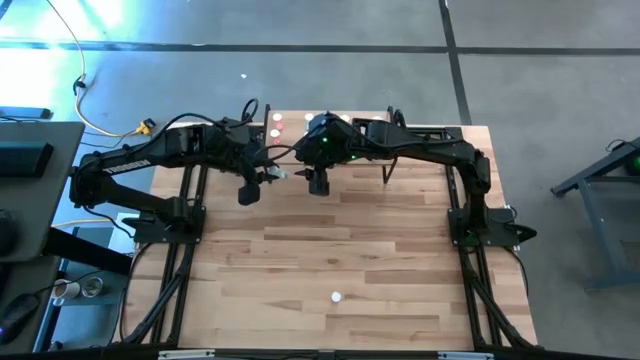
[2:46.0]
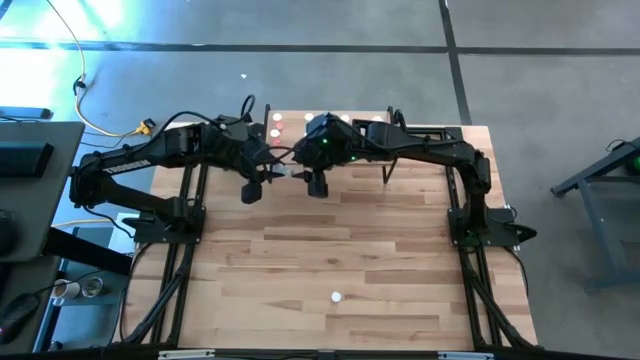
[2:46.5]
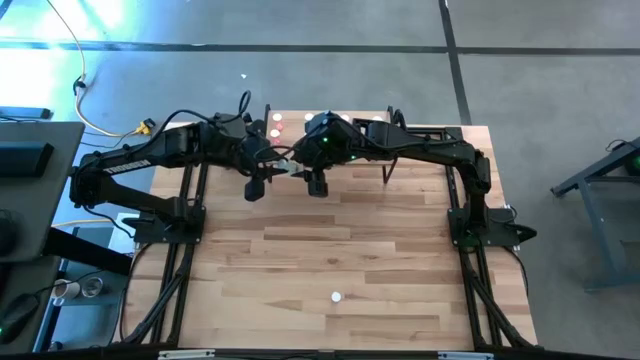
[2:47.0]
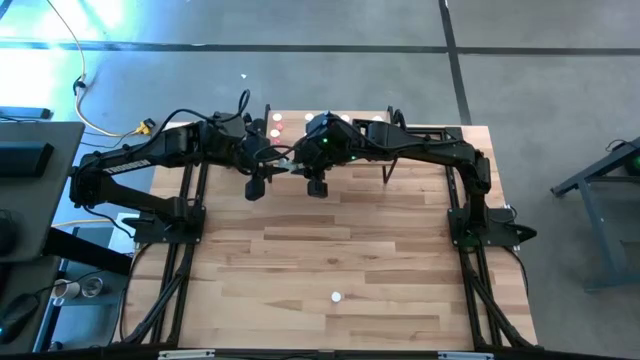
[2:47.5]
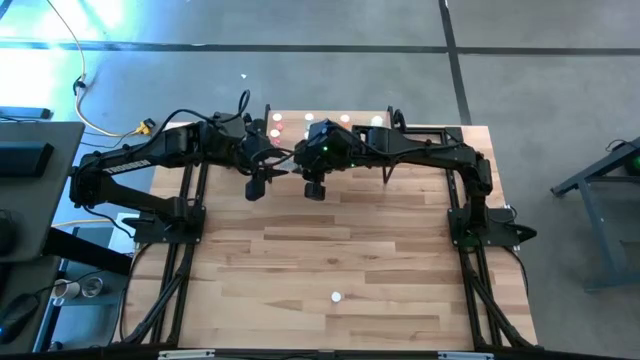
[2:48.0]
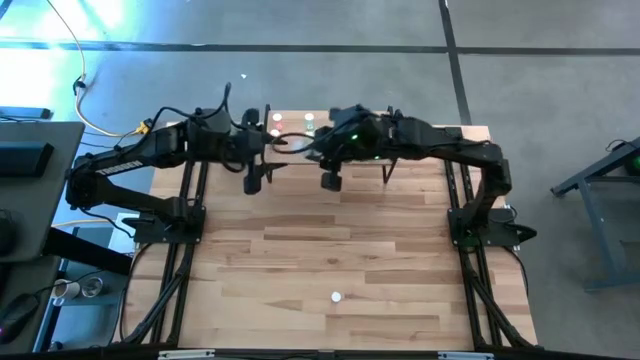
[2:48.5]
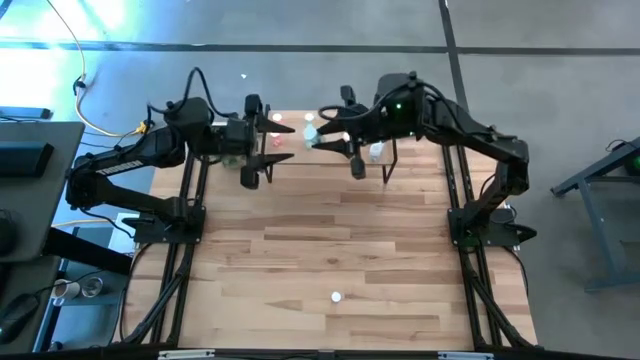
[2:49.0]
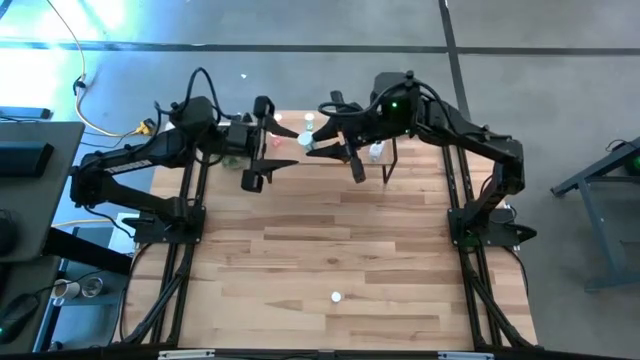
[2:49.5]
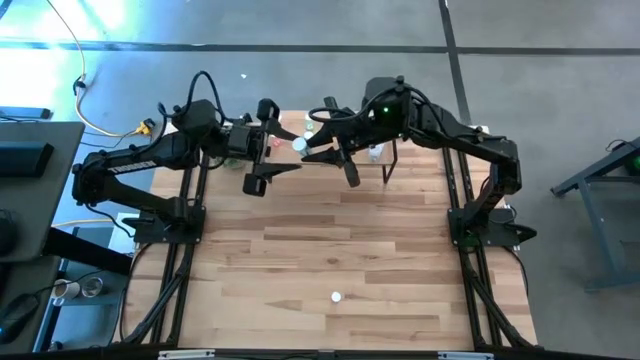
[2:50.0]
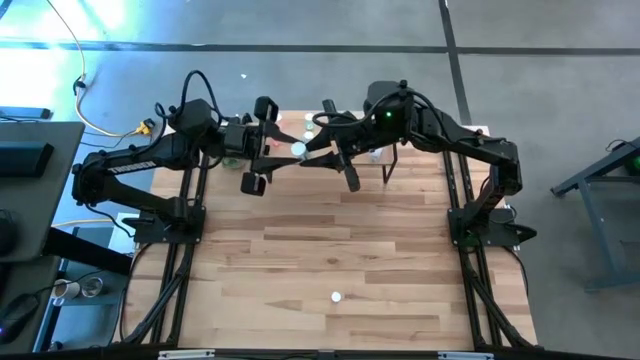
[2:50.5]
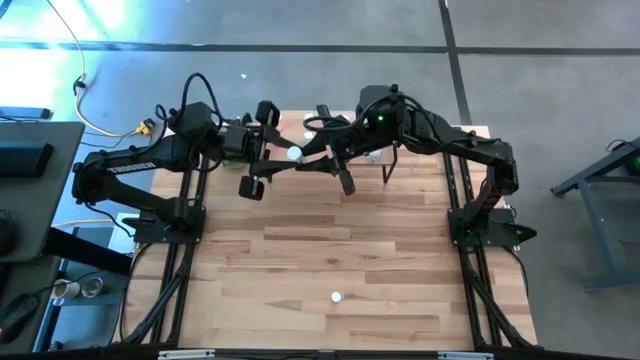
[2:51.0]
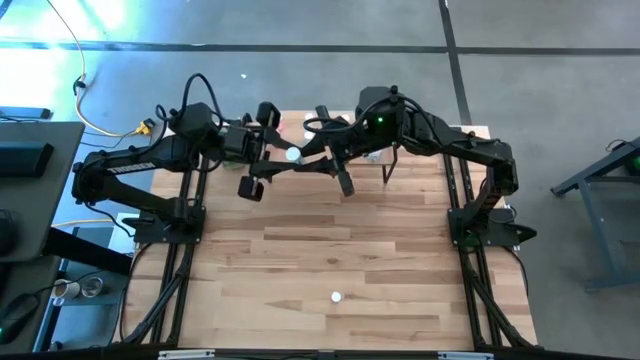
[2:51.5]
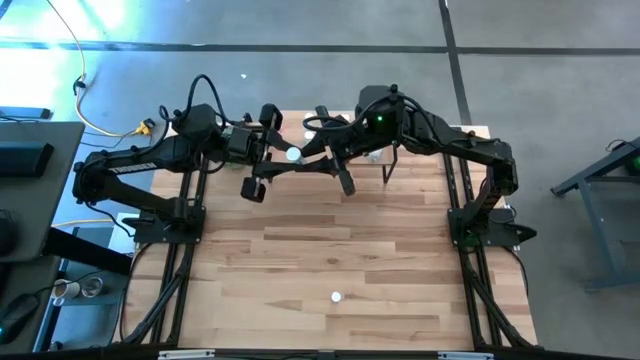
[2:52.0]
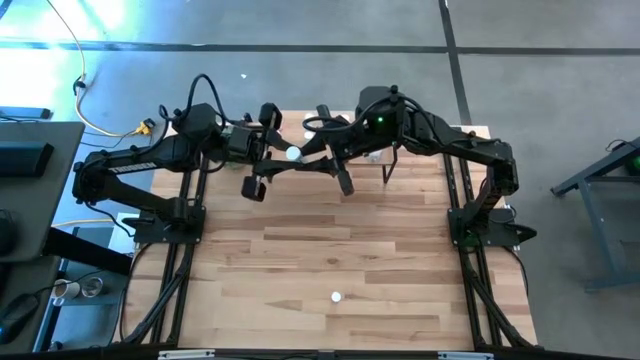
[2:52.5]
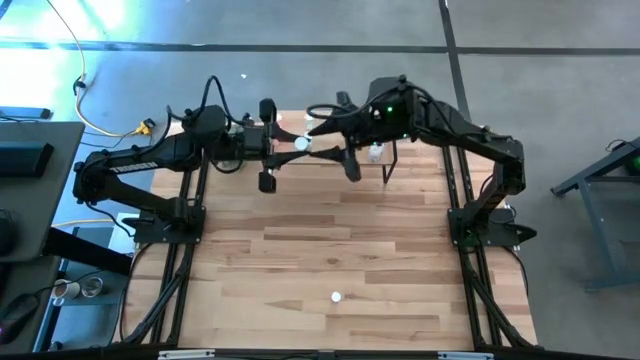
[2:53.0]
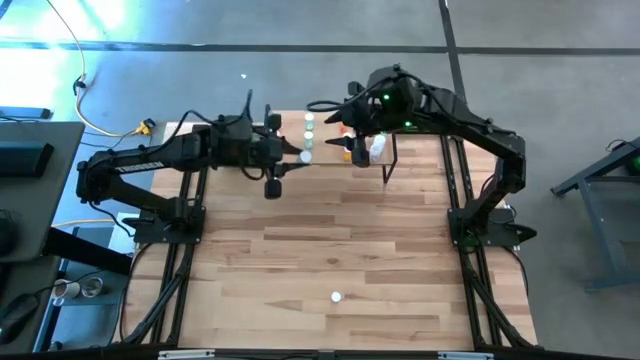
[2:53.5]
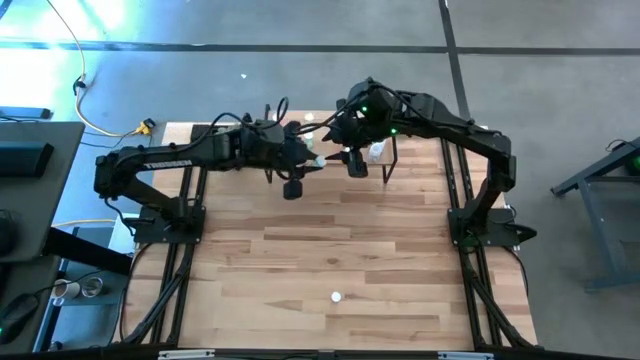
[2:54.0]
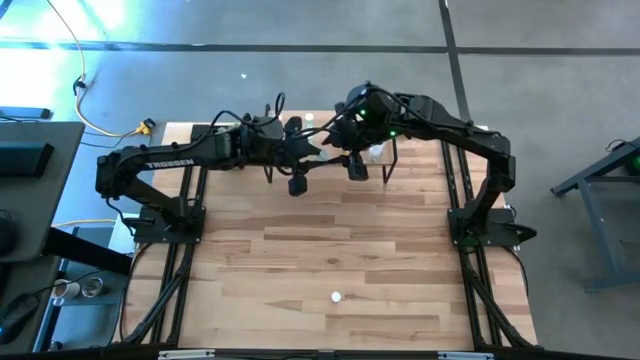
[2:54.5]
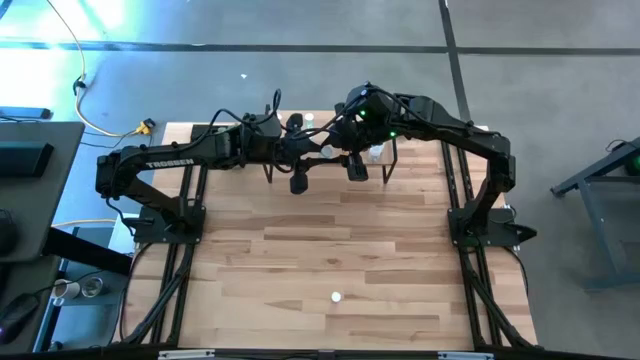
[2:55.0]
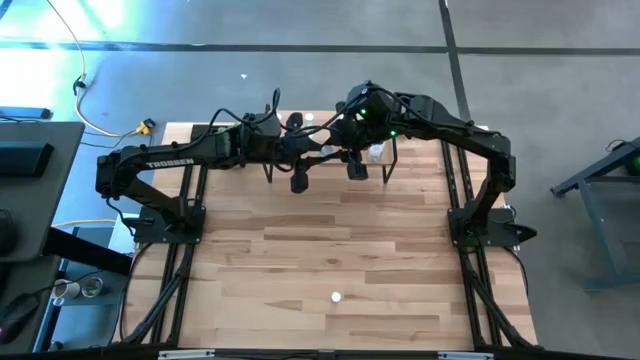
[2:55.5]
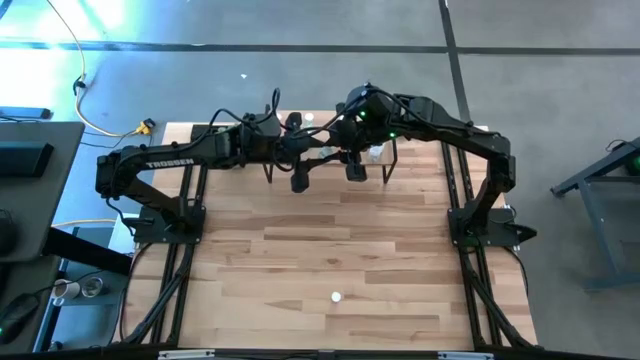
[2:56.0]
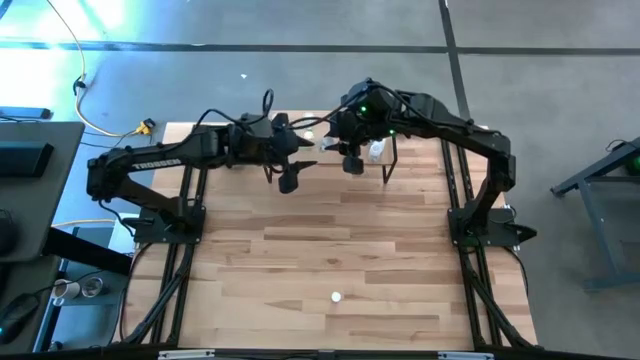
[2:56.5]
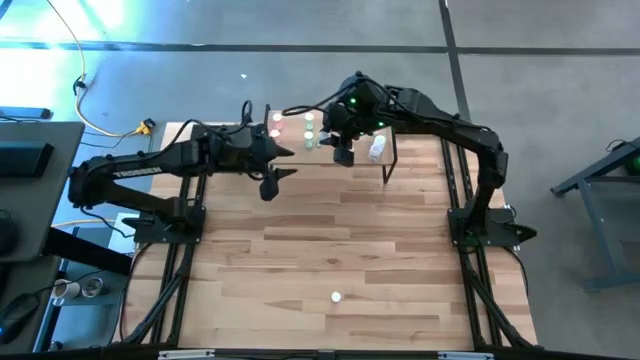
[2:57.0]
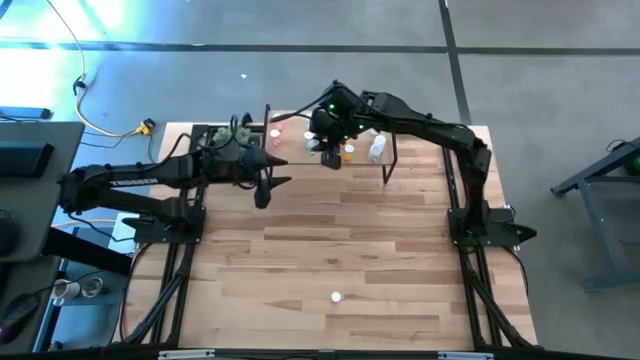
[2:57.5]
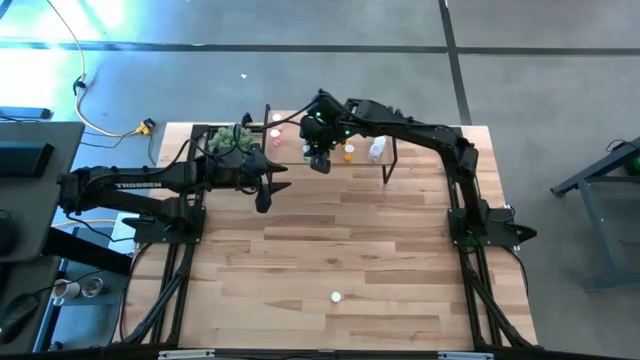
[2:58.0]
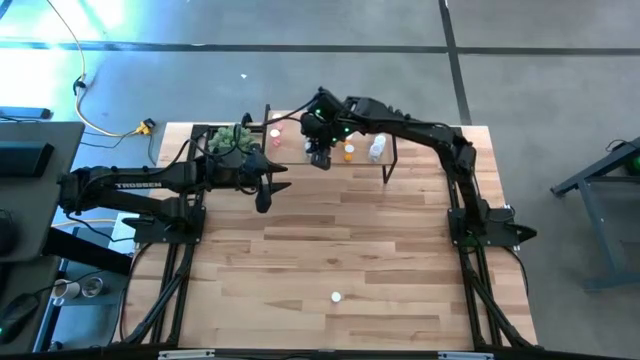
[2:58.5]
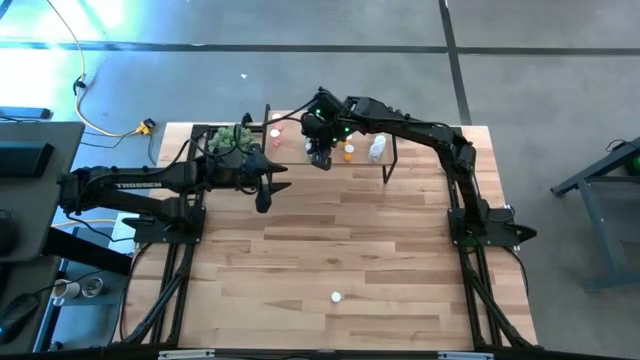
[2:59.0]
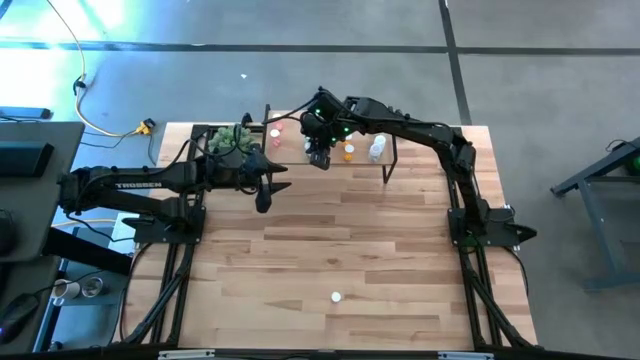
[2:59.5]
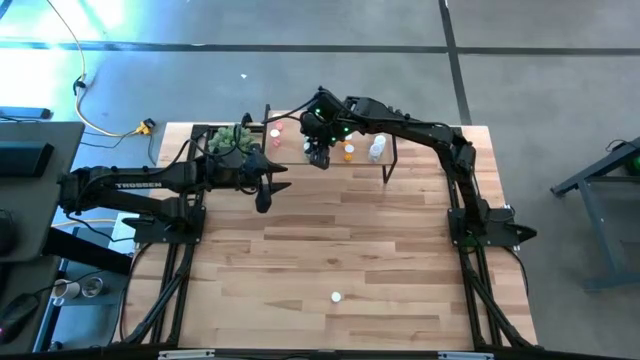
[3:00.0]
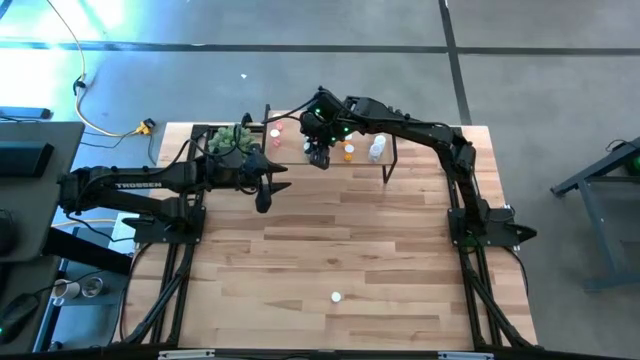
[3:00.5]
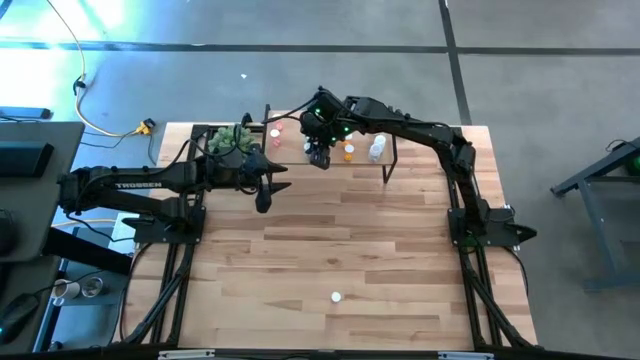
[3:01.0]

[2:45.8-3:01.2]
Task: Pick and place medicine bottles onto shelf by color
Put the blue pill bottle on the shelf aligned with the other blue pill bottles

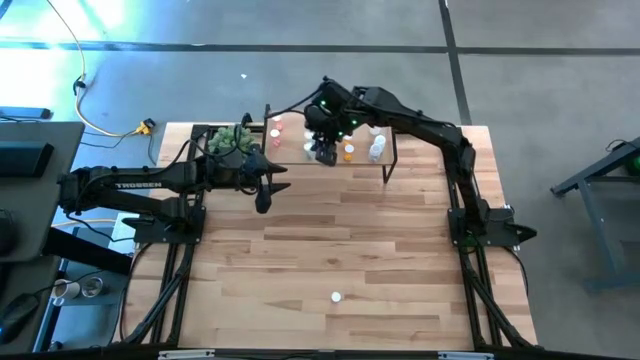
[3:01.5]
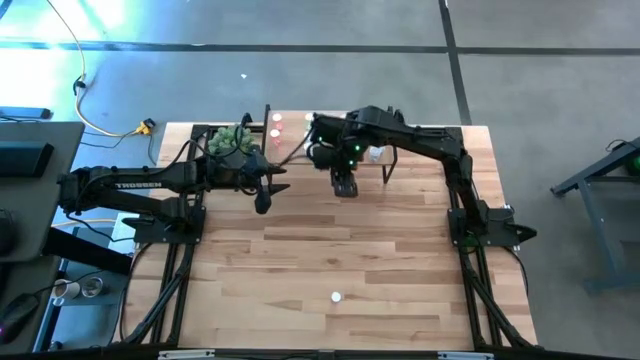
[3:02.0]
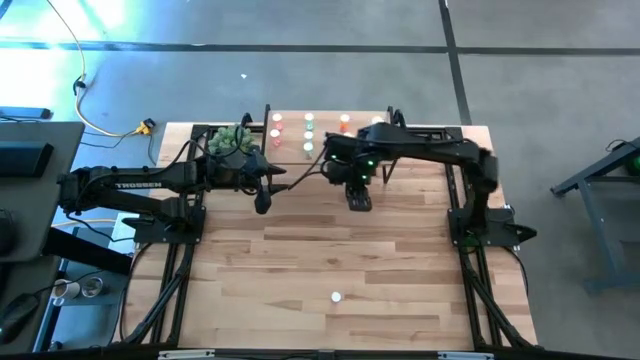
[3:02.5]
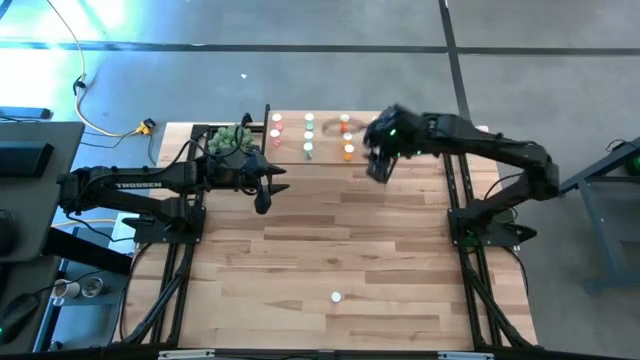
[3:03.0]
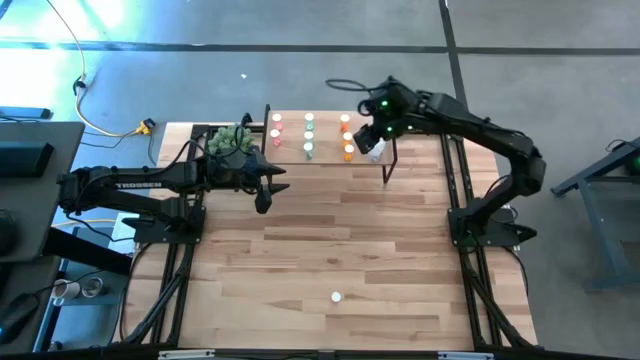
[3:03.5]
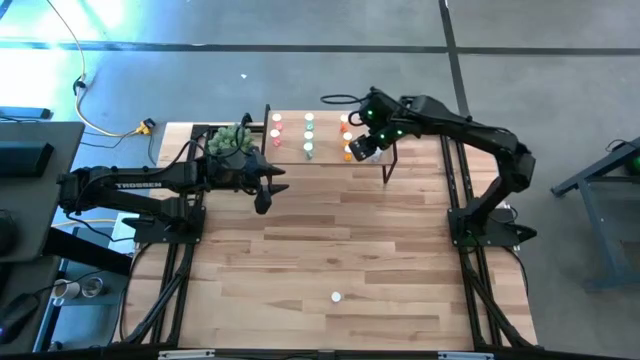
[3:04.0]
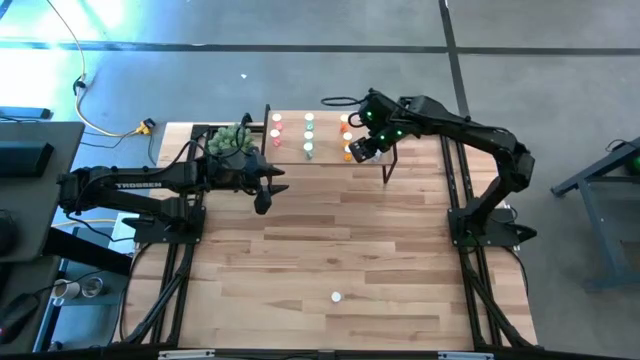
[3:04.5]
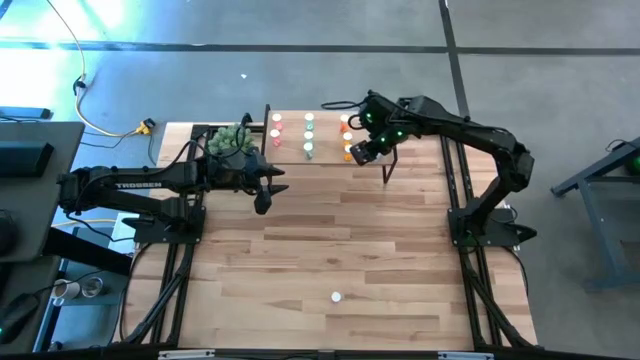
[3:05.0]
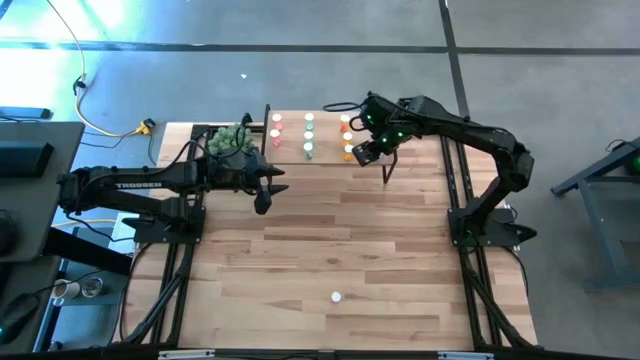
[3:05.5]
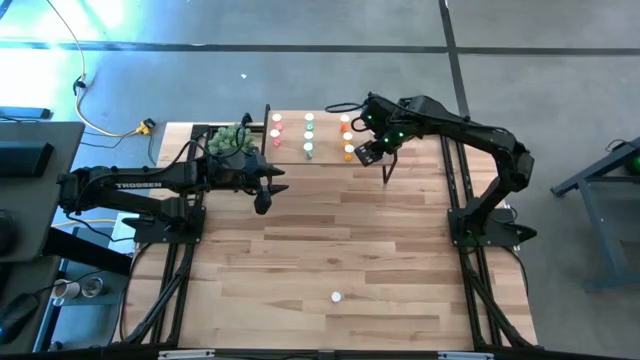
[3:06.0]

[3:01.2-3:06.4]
Adjust the white pill bottle

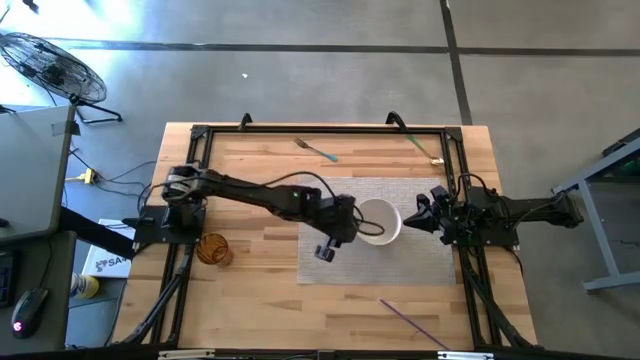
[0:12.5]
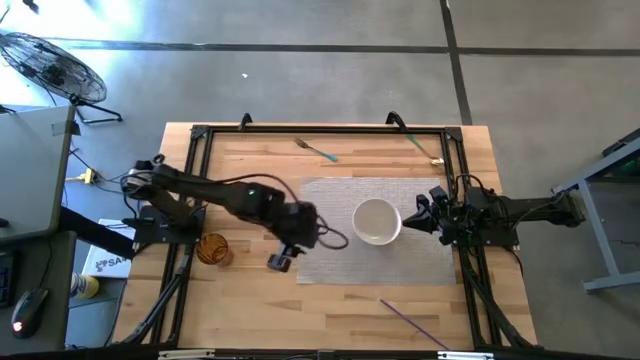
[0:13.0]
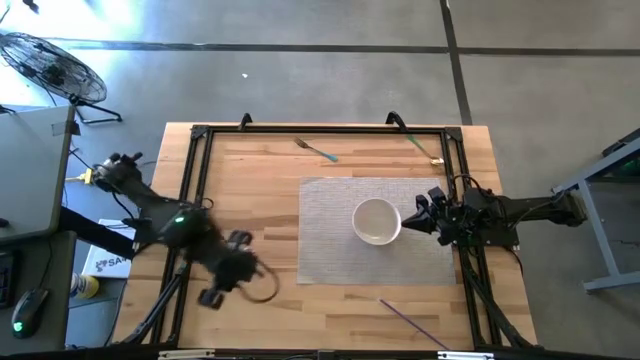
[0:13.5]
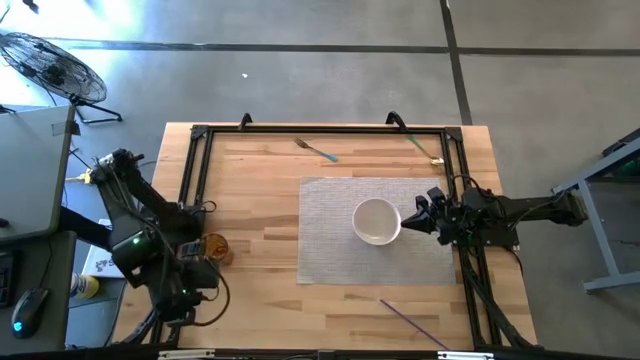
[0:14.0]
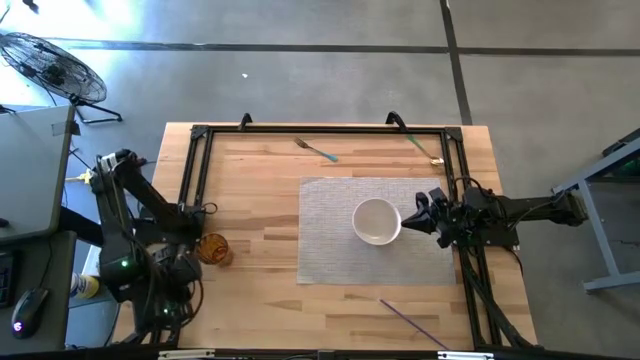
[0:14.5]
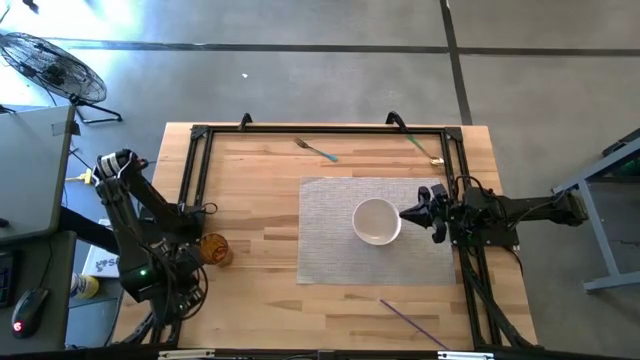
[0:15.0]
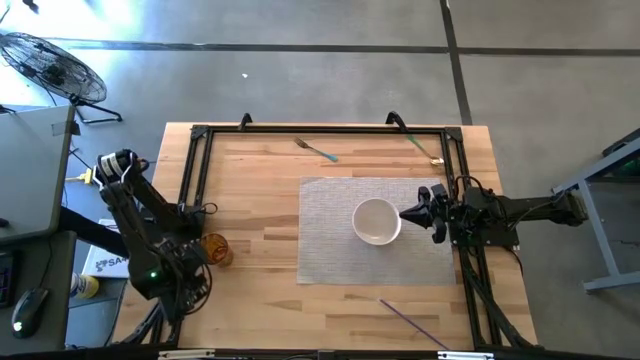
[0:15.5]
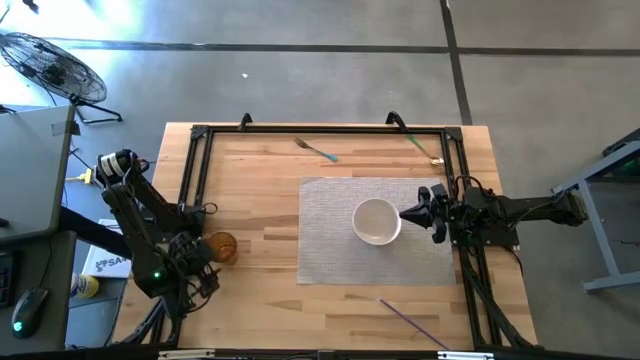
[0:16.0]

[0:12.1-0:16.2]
Task: Pick & Place Utensil
Put the brown cup on the gray mat to the top right of the white bowl
